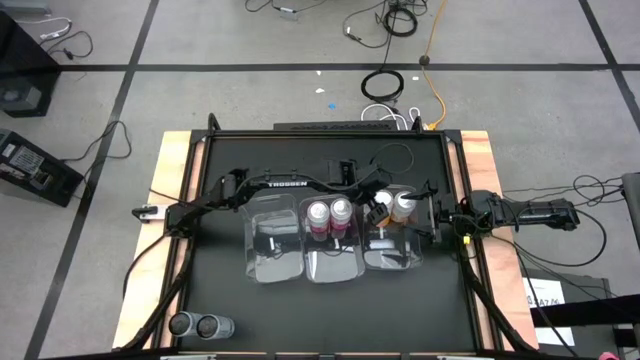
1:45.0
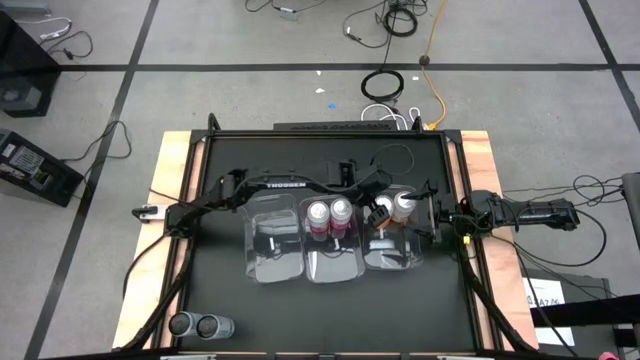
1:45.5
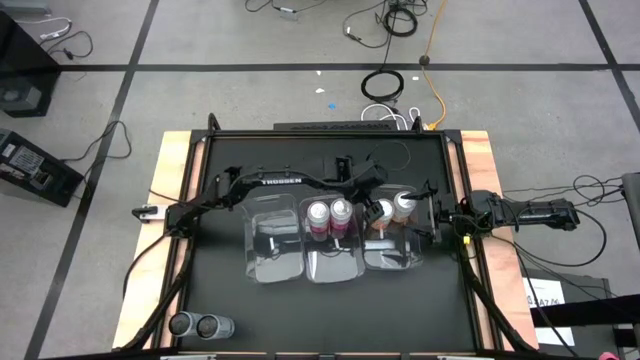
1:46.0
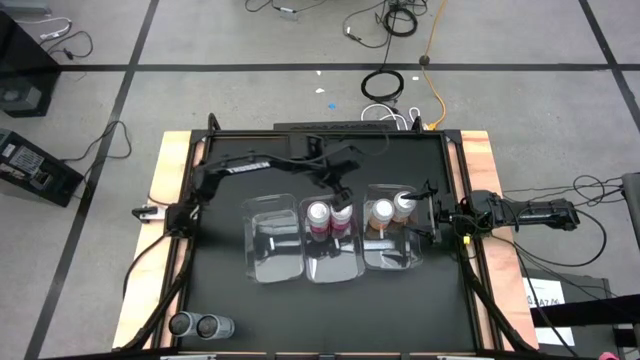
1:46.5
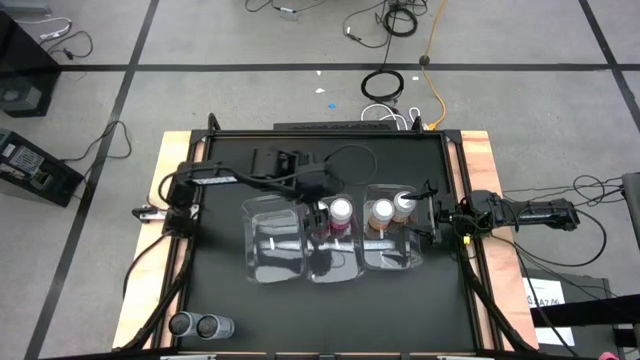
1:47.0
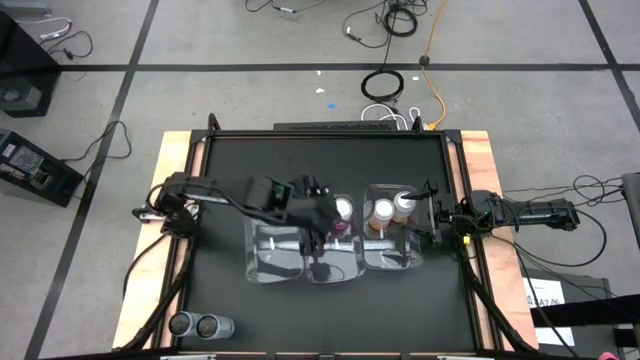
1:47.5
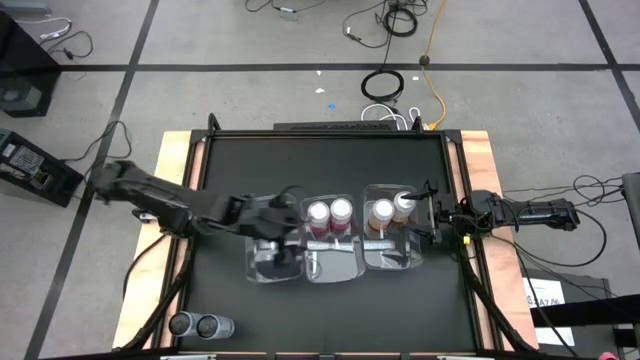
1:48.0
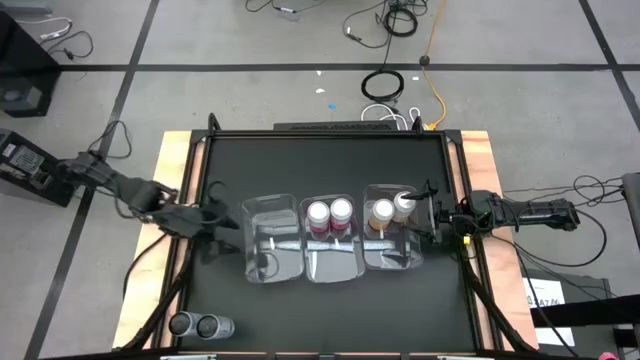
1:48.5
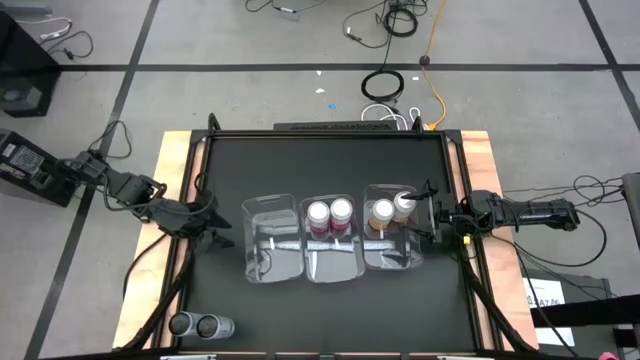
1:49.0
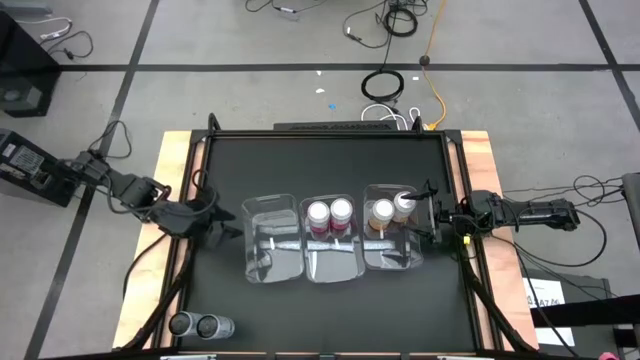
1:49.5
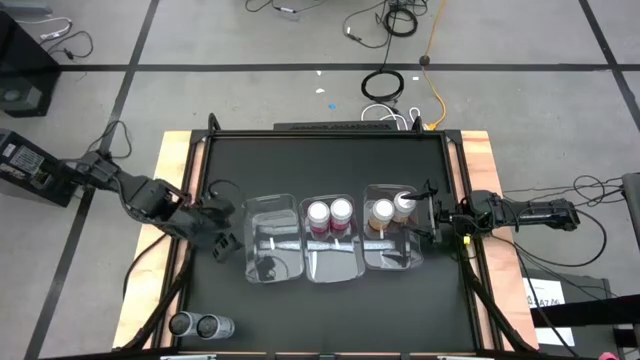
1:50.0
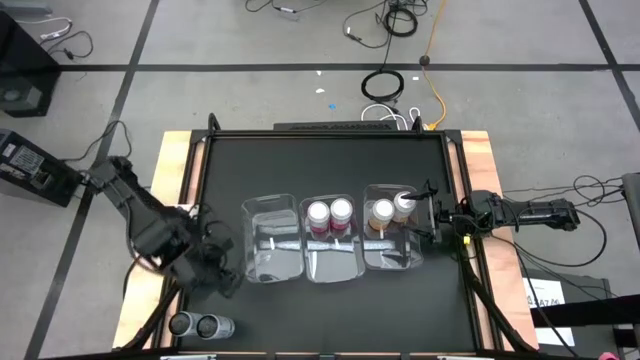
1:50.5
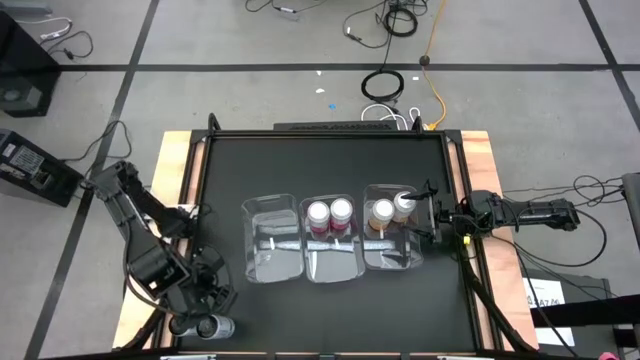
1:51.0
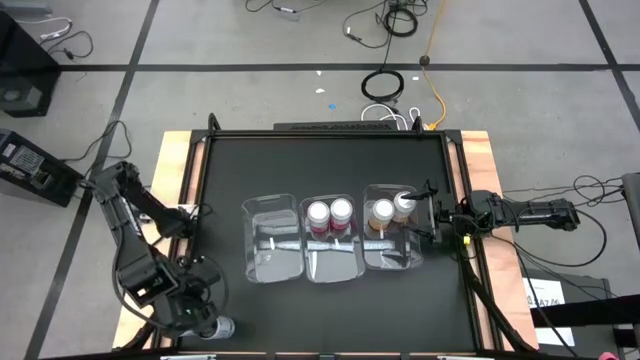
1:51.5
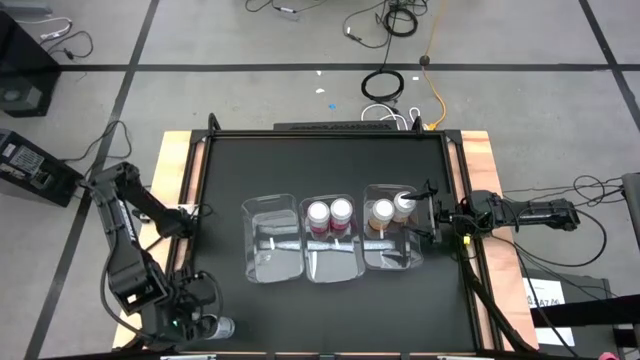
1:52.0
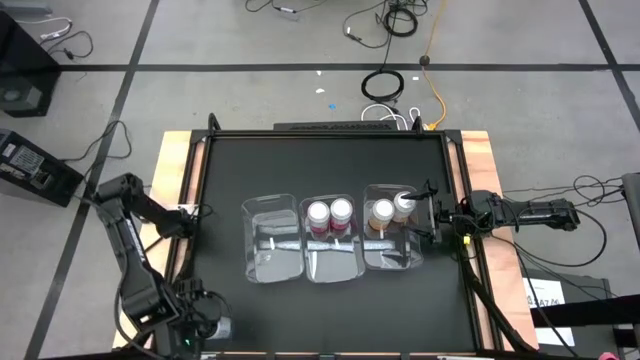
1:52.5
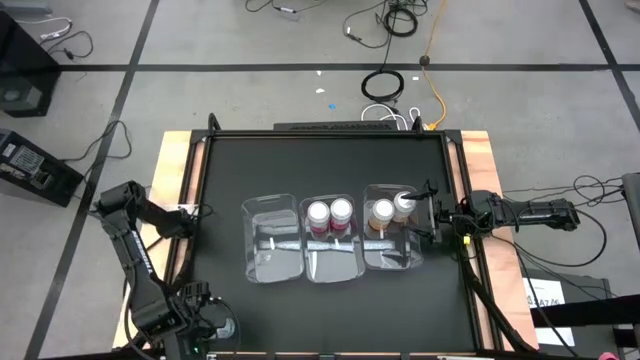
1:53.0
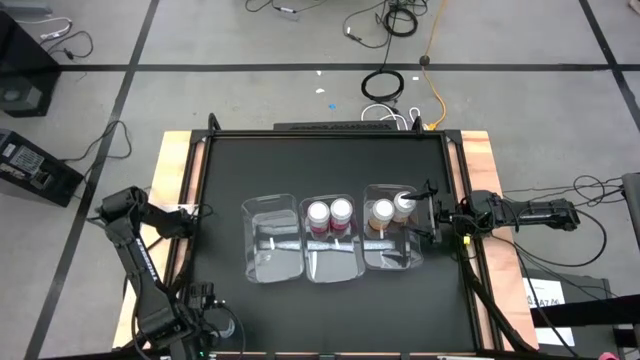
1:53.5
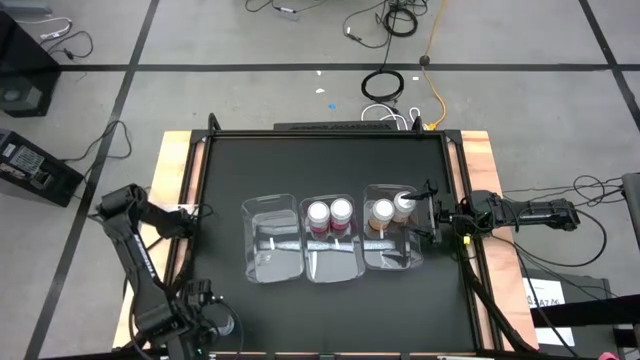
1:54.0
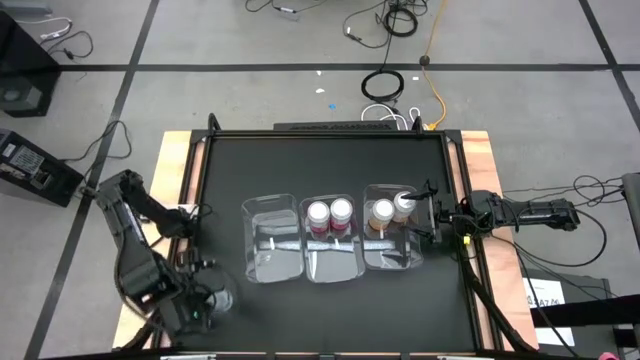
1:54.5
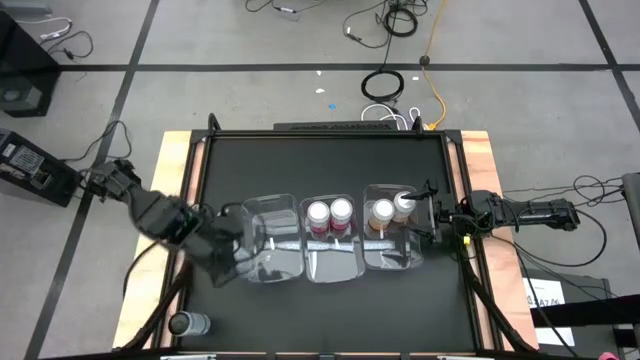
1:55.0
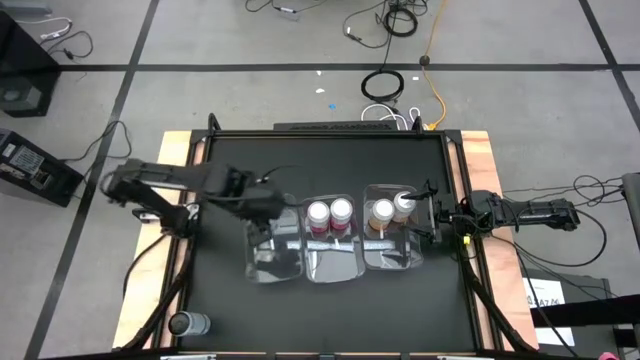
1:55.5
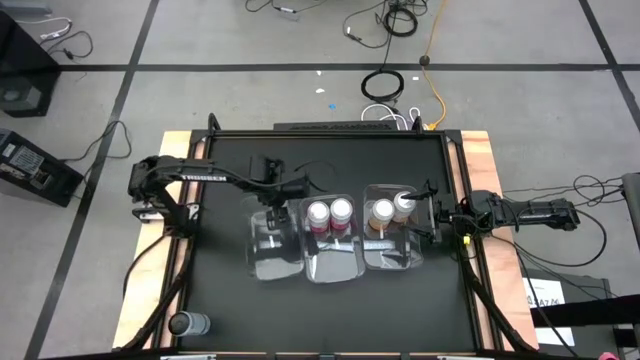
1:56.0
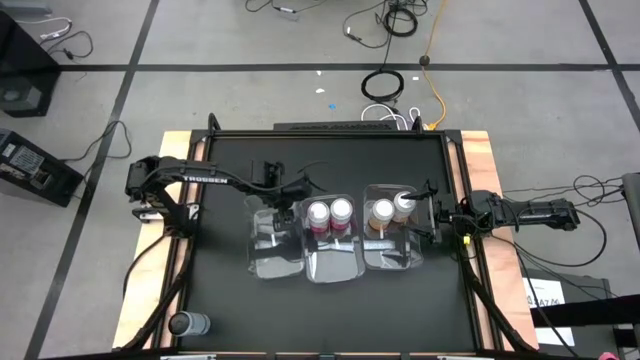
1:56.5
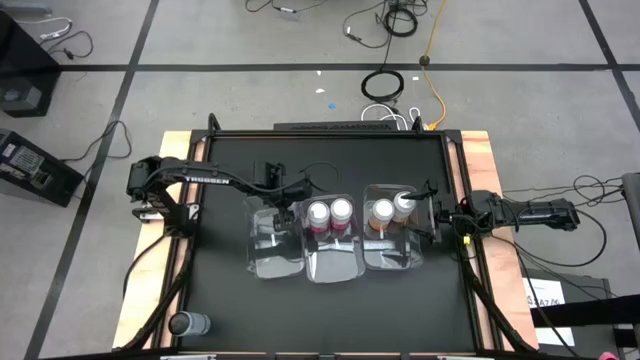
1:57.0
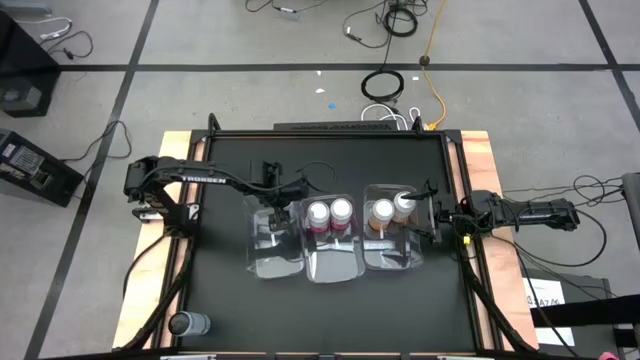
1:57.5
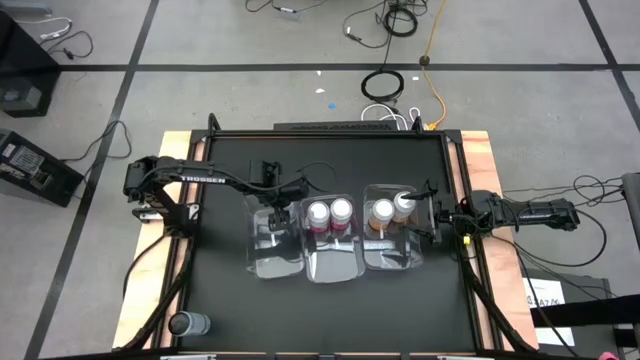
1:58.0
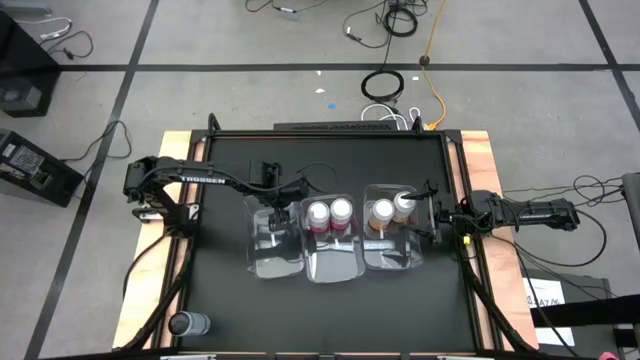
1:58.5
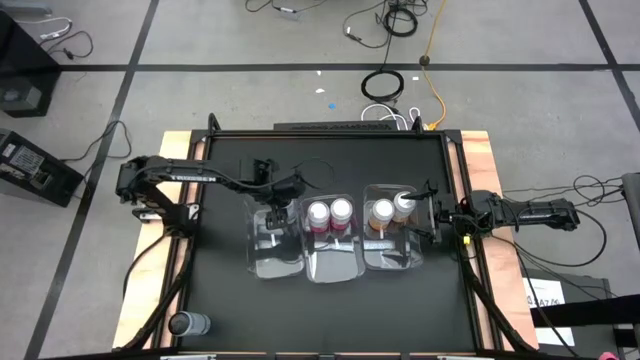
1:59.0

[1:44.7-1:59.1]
Task: Sort soda cans
Put the right white soda can into the left transparent bin

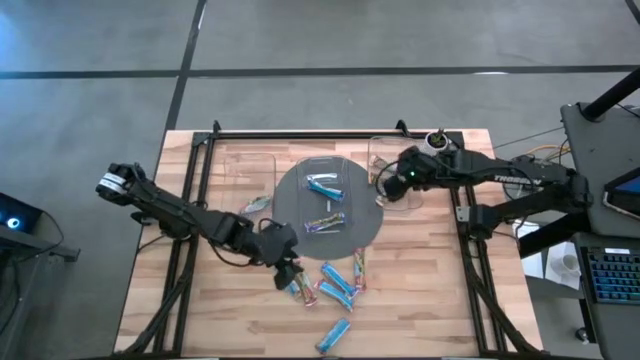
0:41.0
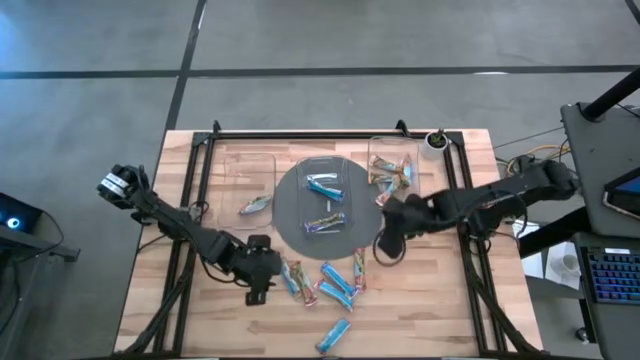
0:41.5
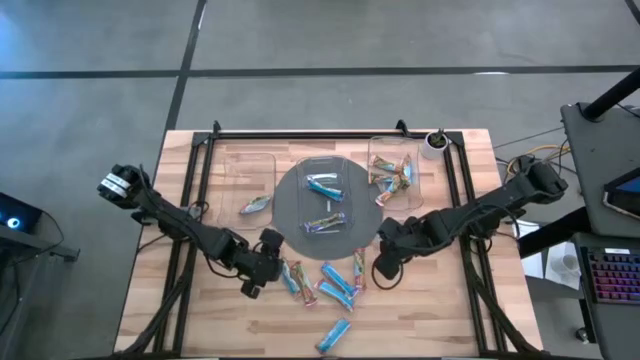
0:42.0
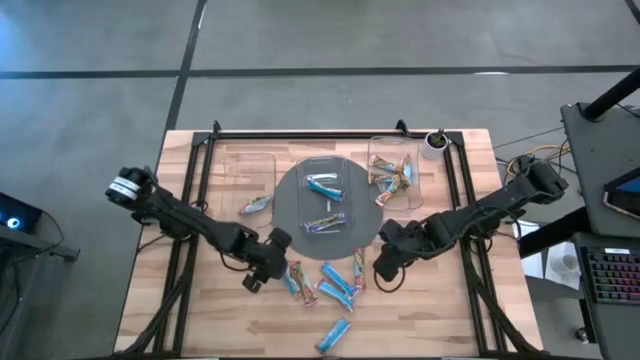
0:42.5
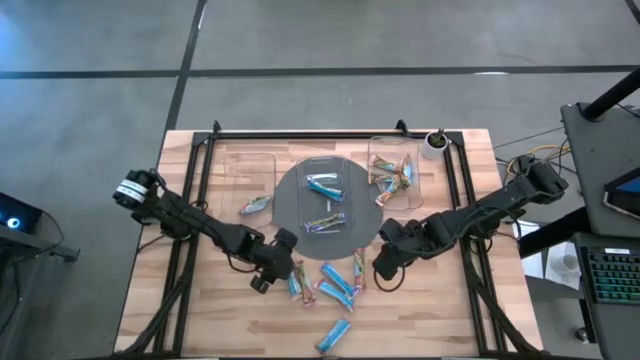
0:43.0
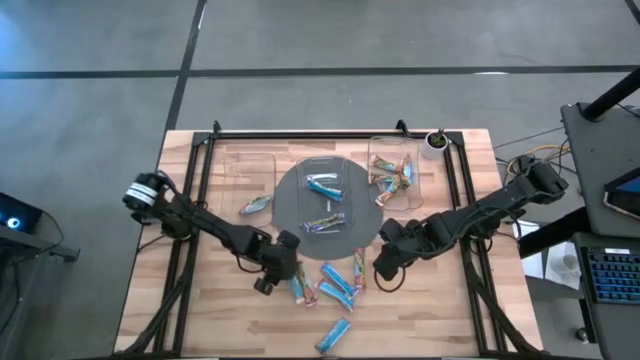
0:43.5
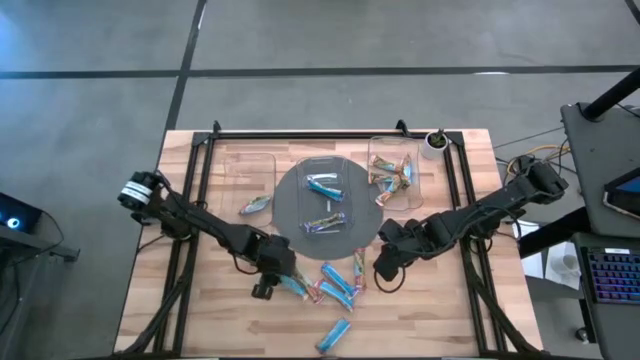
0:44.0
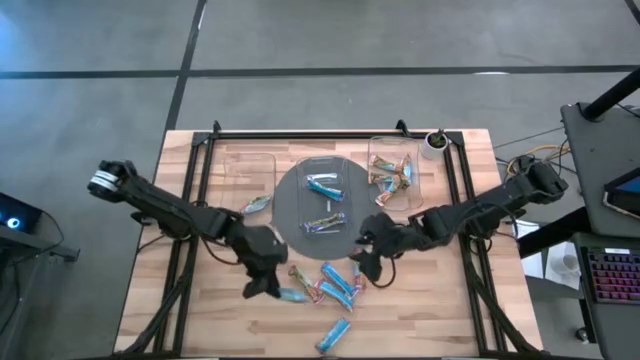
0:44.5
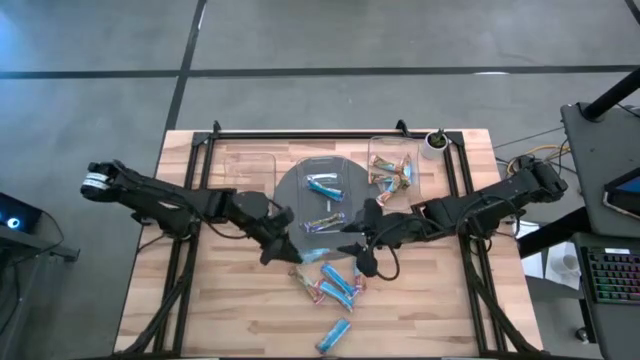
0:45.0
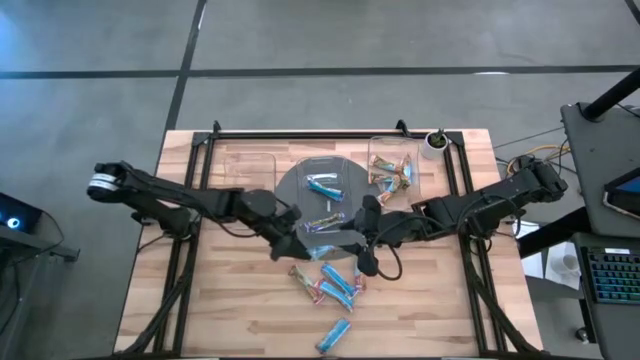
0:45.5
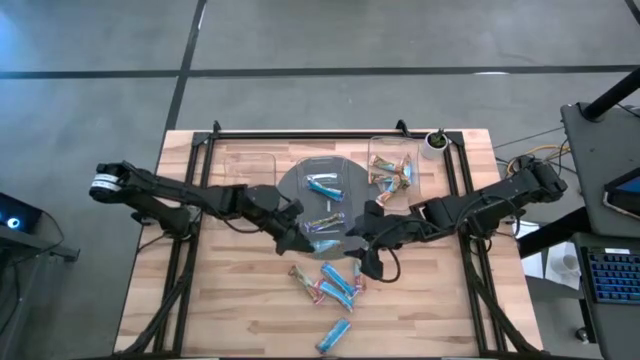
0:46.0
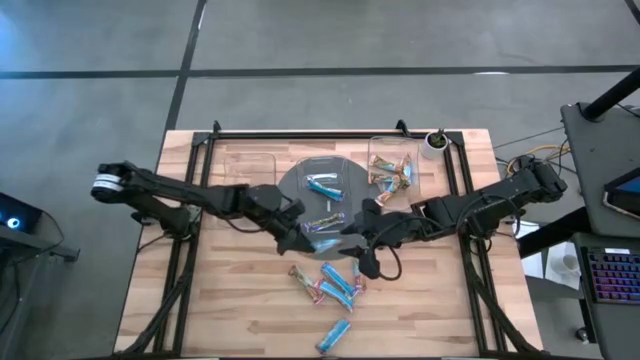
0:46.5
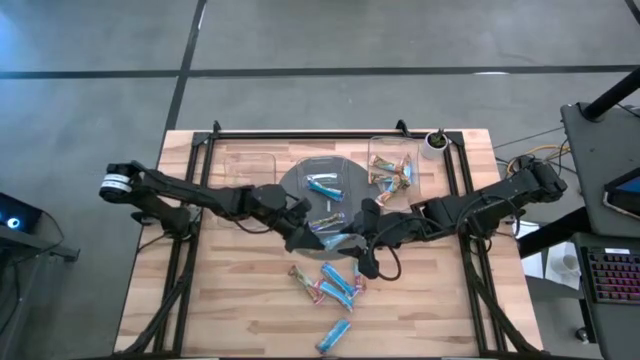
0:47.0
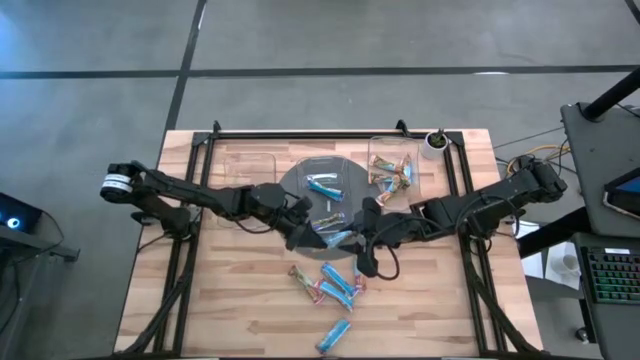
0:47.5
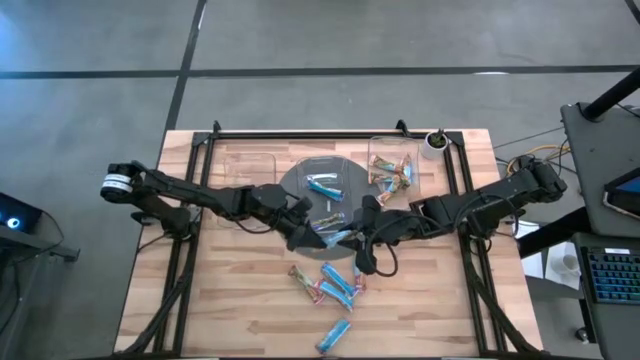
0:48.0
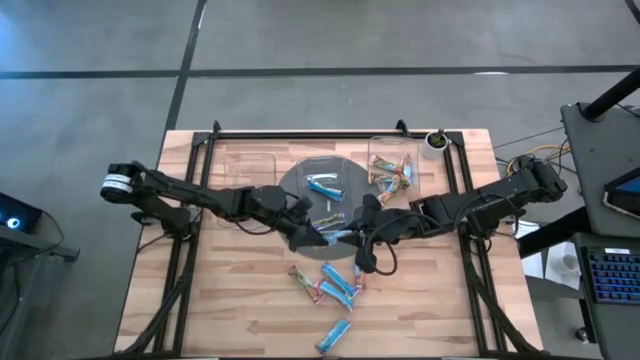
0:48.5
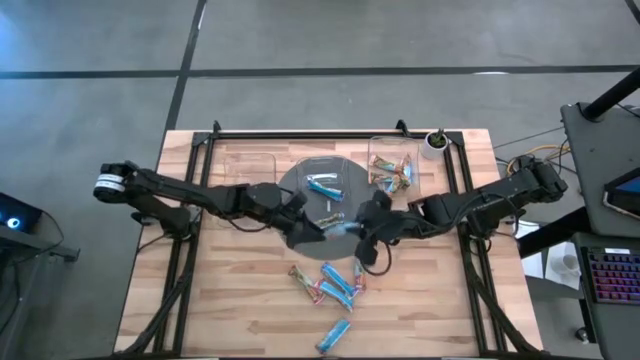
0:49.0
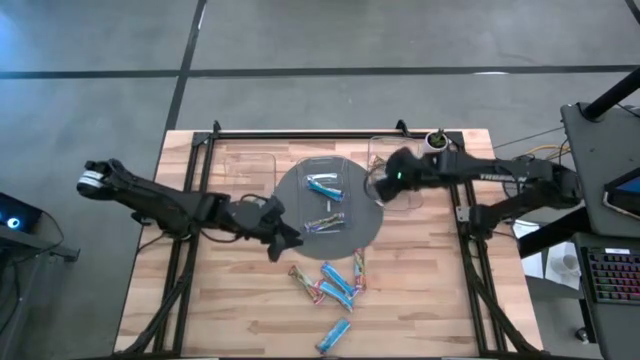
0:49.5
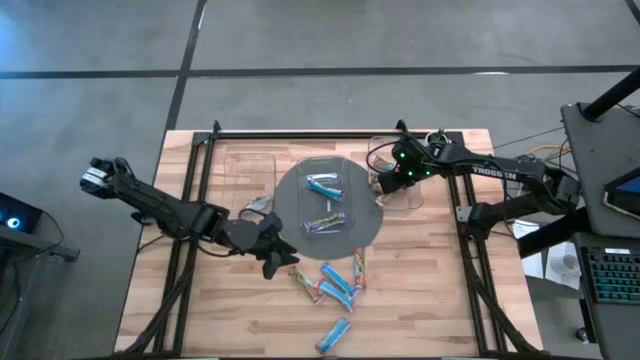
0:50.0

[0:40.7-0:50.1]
Task: Pick and place Granola Bars by type
Put the yellow granola bar into the right transparent bin
